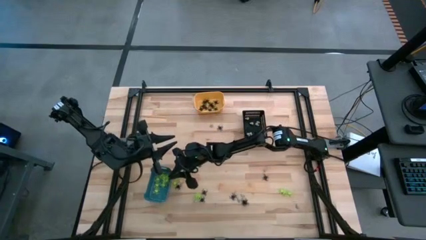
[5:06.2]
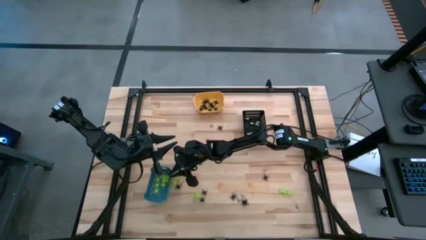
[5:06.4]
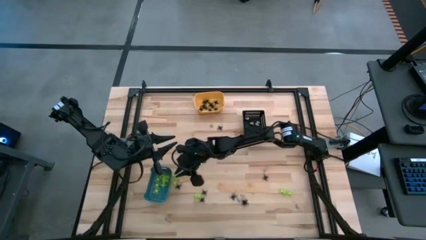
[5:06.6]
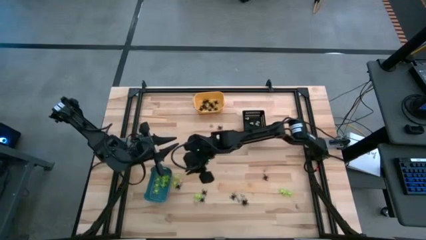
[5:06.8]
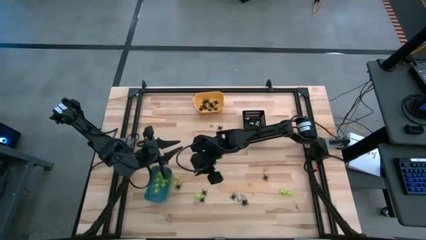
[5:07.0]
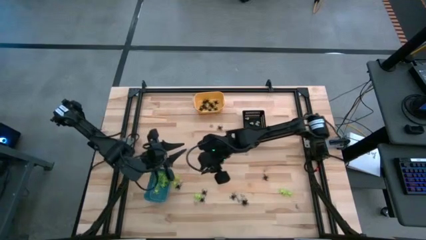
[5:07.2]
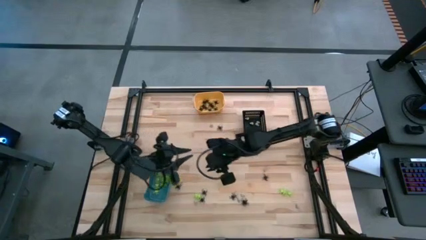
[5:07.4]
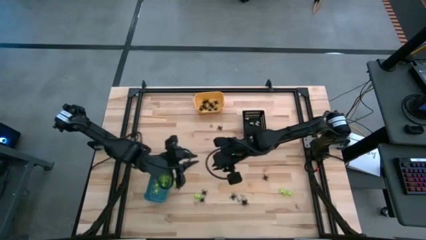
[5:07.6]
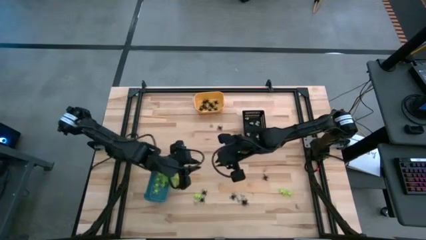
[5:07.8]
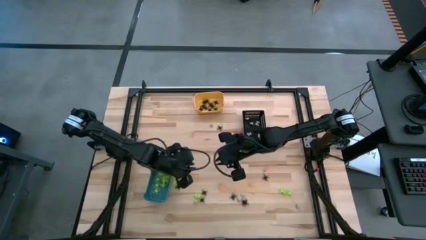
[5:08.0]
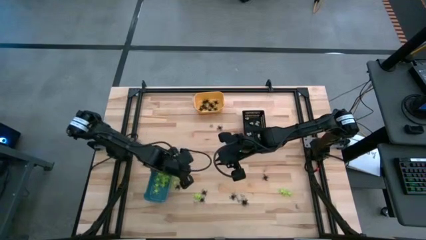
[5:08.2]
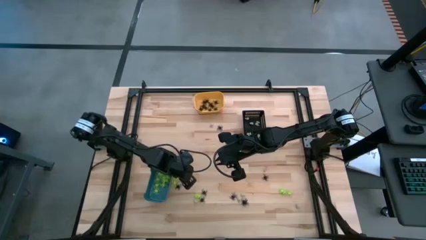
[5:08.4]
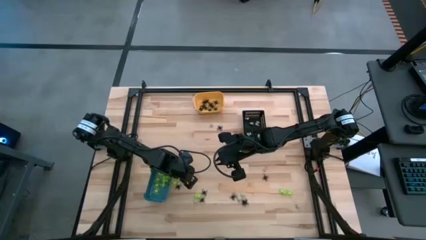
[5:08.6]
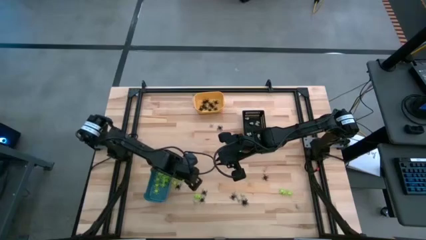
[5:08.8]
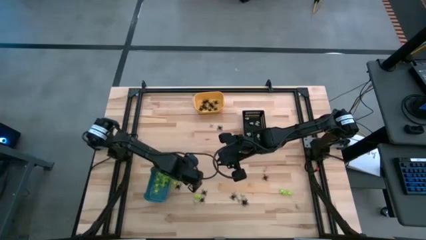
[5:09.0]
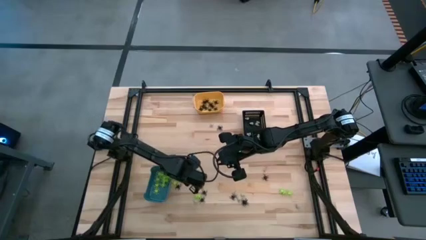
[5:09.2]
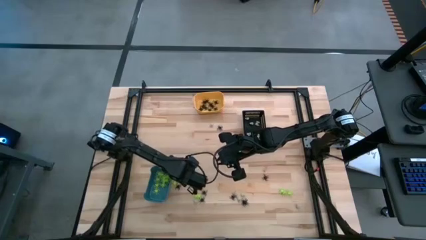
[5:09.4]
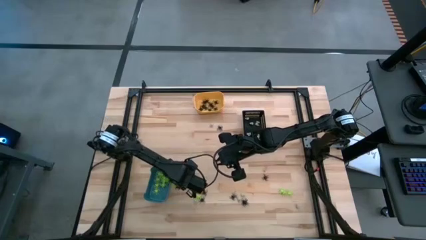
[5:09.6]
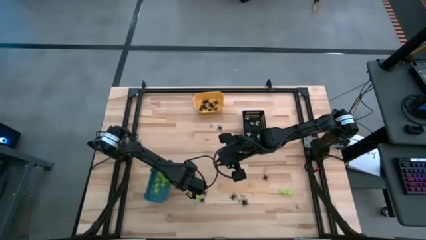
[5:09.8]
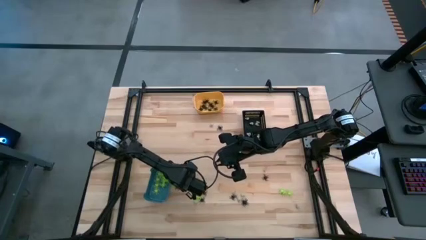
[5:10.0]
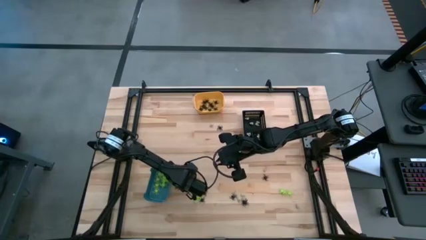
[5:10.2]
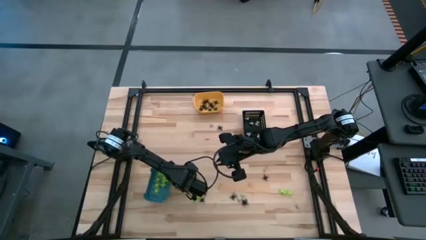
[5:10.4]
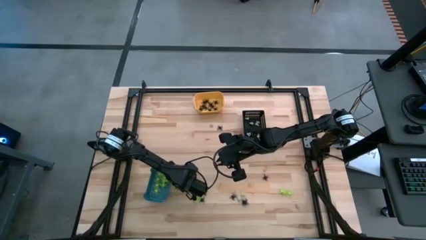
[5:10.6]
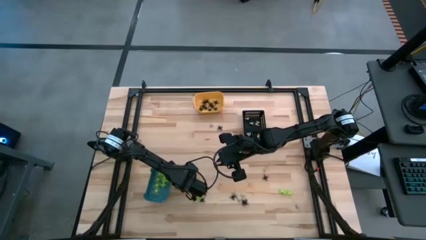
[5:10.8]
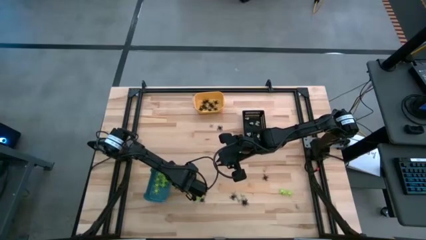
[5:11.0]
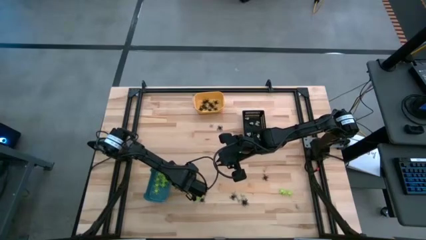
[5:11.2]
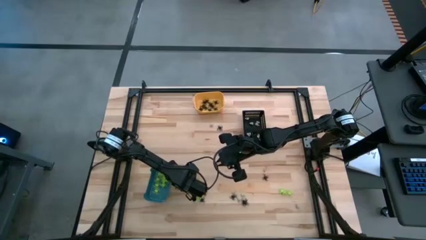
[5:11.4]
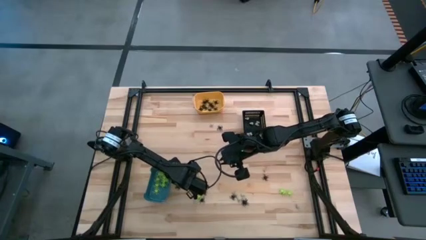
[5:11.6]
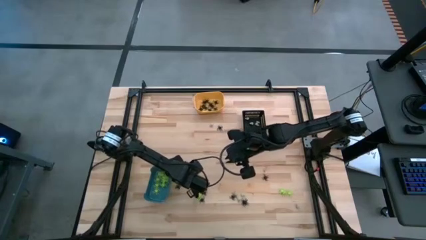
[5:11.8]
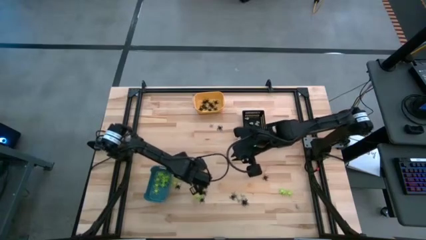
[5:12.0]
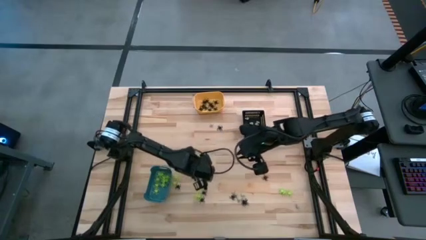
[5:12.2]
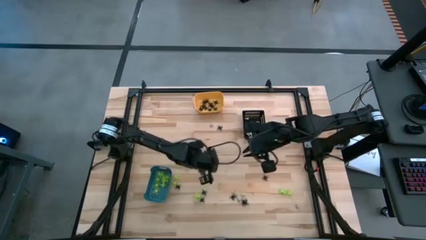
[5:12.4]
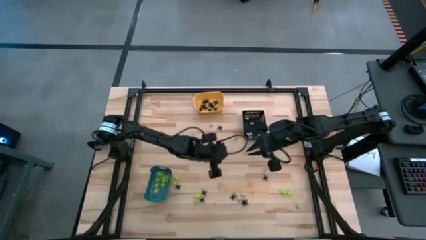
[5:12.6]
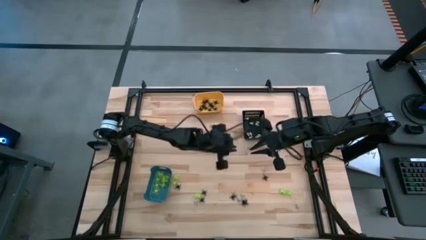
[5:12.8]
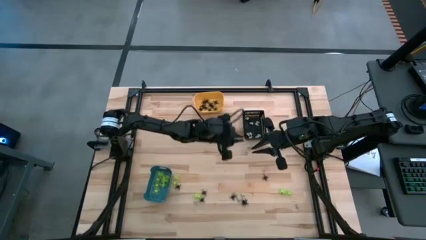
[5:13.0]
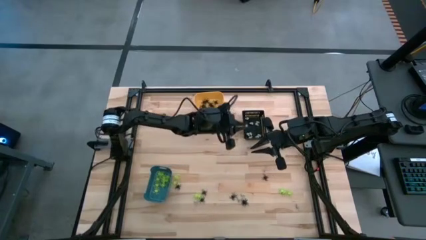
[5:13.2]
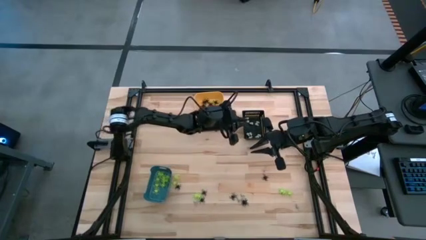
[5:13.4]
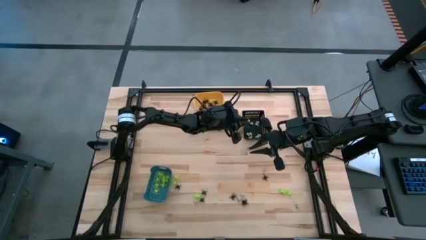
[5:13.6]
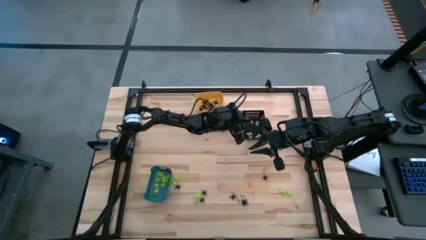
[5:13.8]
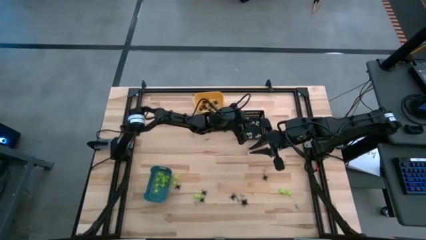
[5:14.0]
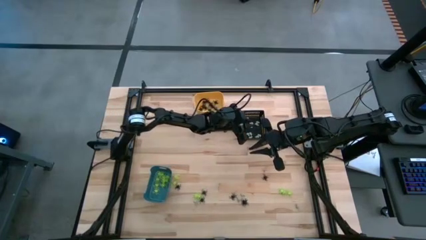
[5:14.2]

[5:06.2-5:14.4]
Task: Sort Halloween decoration
Put the white skull toy into the black bin

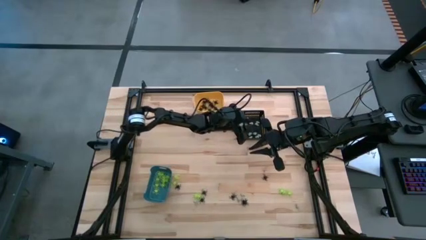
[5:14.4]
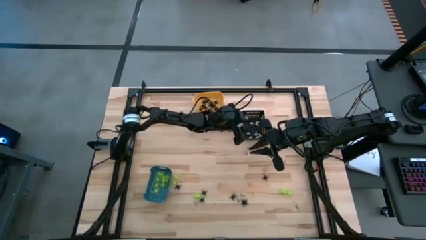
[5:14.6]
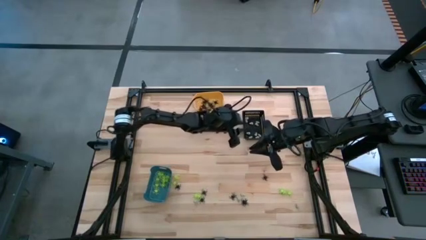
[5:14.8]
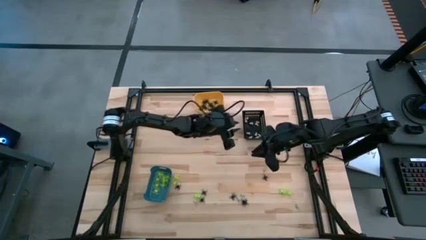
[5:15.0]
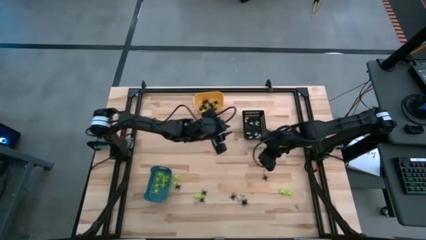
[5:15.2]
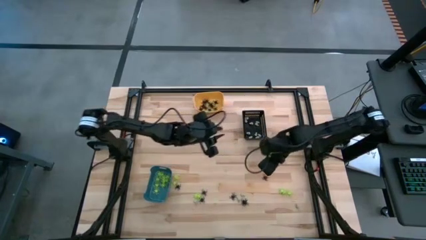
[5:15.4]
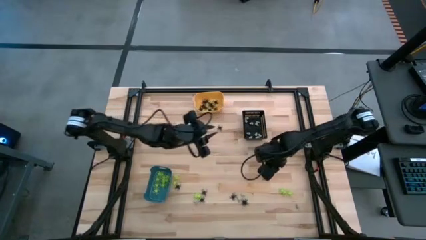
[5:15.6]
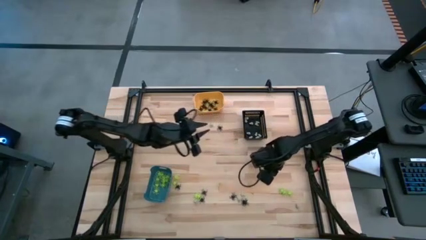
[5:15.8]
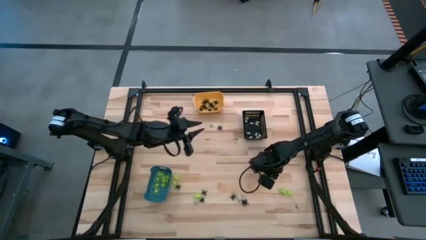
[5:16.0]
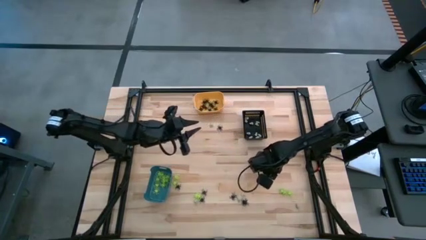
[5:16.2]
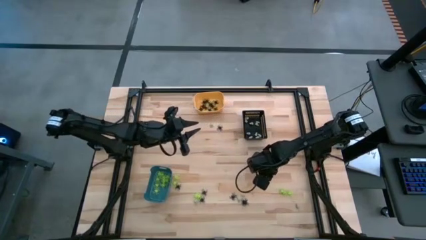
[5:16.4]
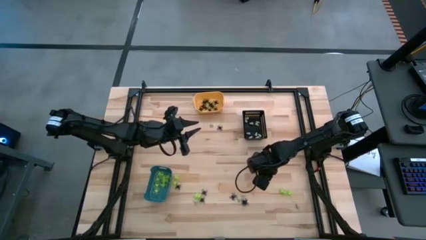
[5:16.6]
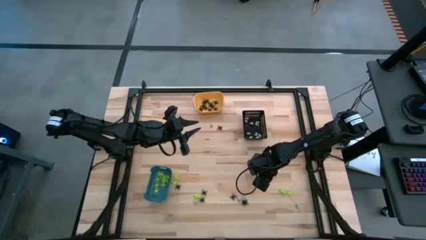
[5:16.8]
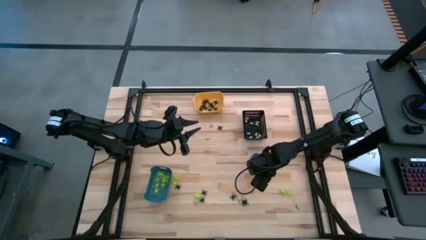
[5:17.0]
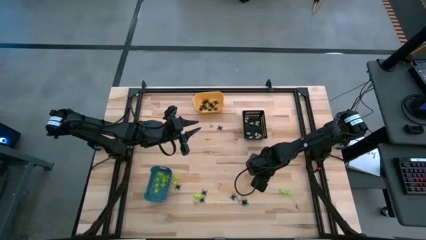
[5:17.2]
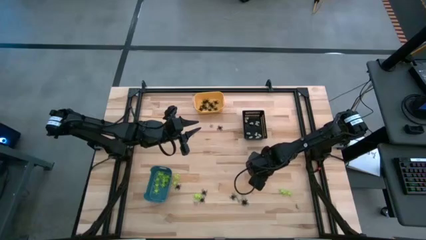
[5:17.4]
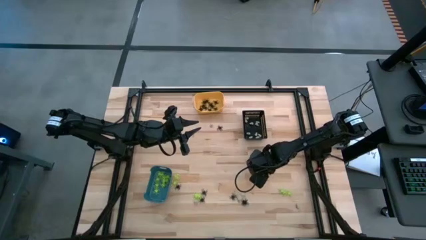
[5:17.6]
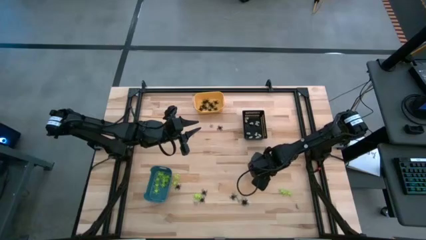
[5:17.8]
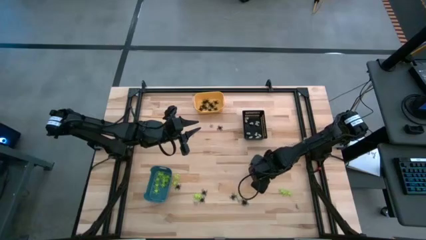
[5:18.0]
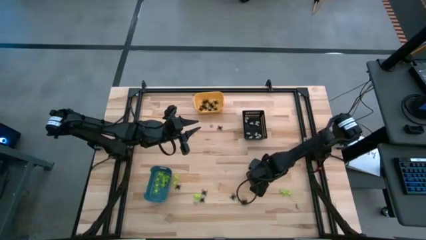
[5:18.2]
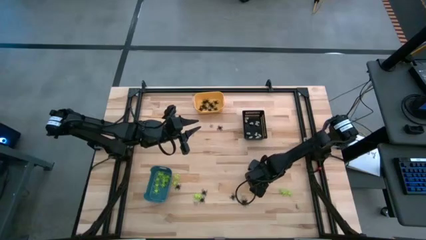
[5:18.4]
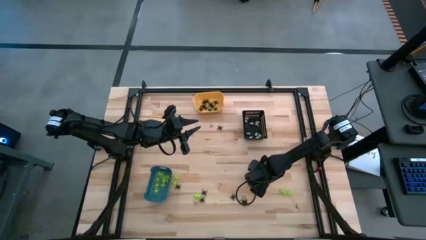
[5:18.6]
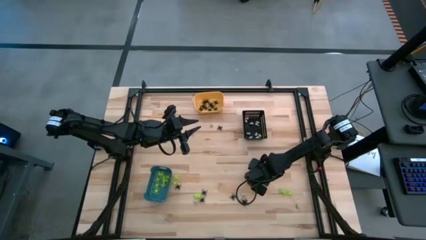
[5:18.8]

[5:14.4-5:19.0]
Put the black spider toy into the yellow bin

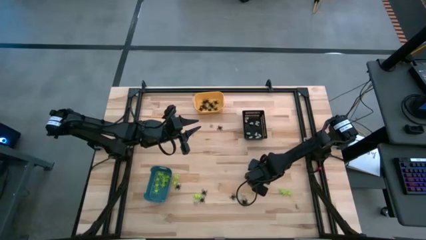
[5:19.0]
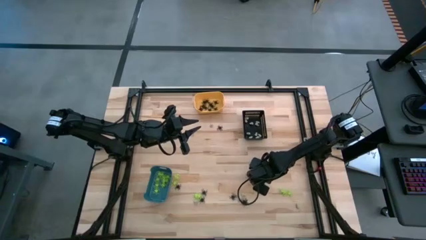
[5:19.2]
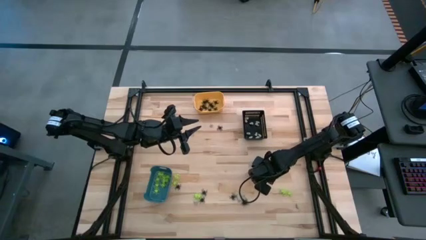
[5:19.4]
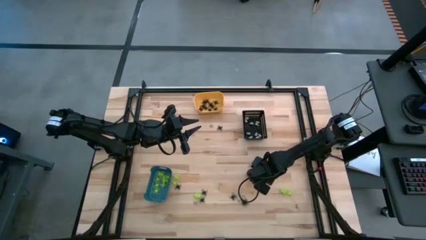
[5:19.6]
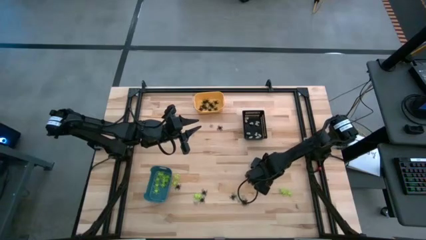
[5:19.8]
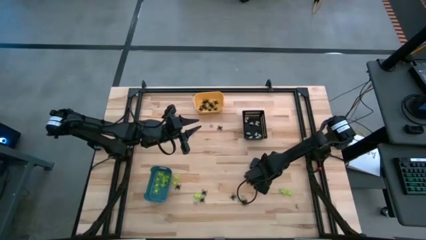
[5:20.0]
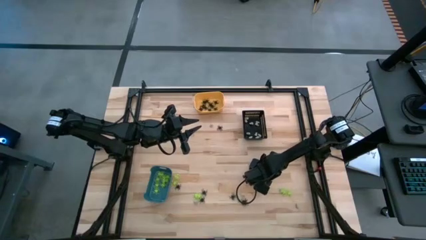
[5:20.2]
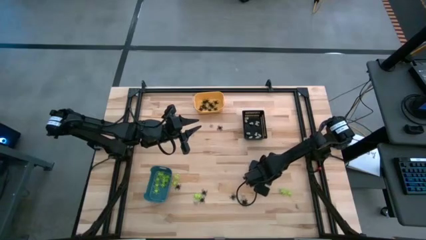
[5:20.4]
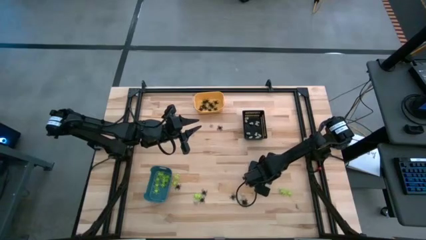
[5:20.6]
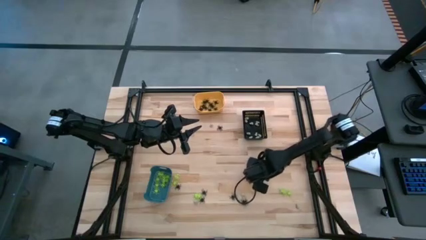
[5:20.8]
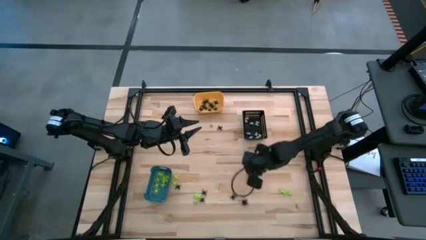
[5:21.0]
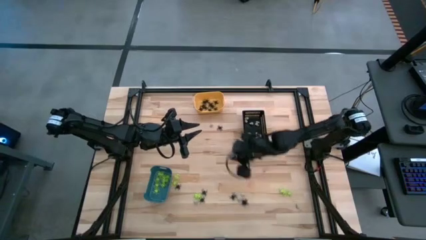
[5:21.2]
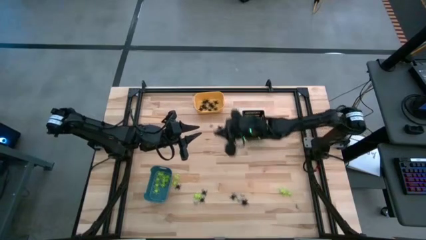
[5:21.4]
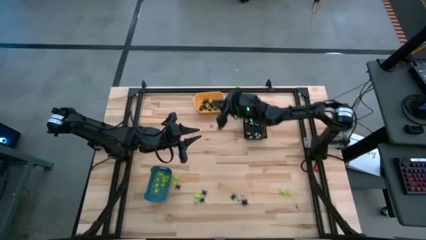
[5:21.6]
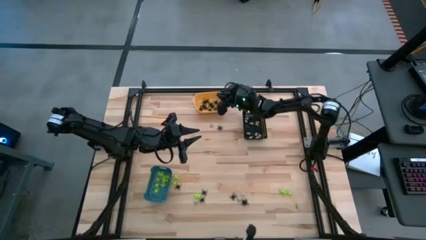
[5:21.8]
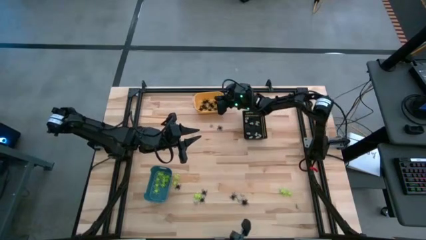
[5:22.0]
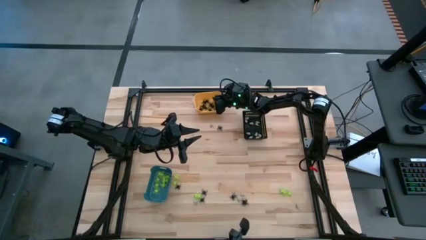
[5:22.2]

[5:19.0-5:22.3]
Put the black spider toy into the yellow bin
